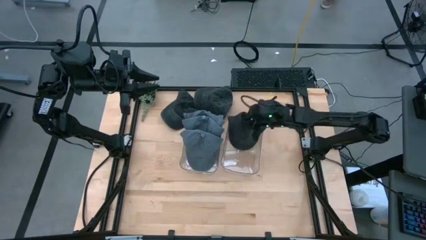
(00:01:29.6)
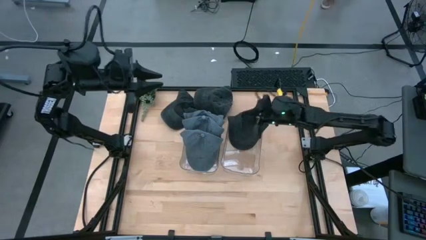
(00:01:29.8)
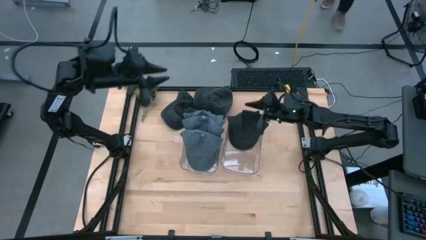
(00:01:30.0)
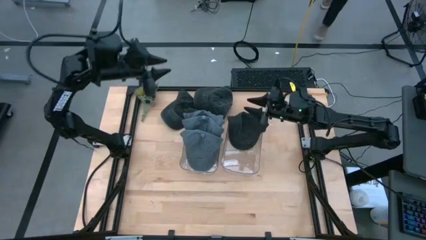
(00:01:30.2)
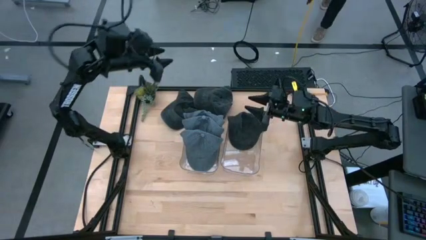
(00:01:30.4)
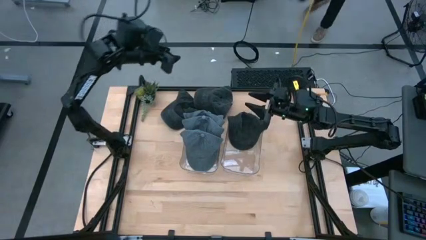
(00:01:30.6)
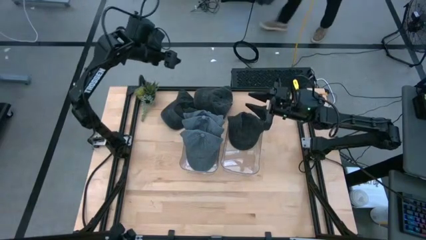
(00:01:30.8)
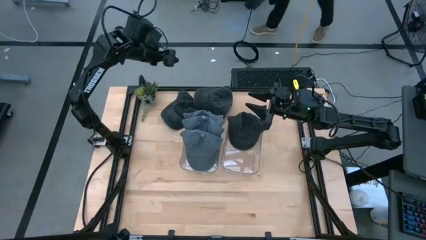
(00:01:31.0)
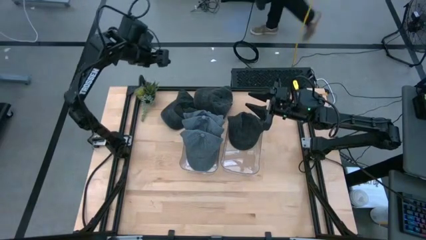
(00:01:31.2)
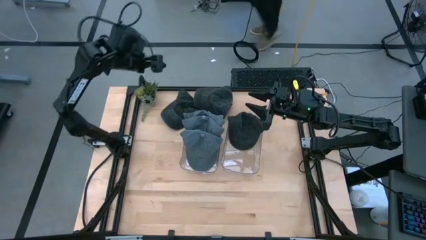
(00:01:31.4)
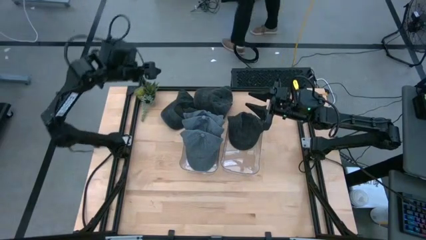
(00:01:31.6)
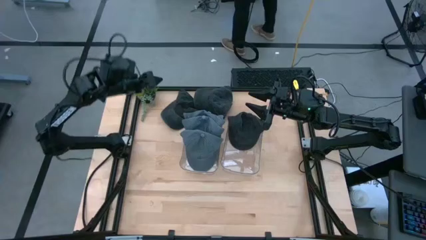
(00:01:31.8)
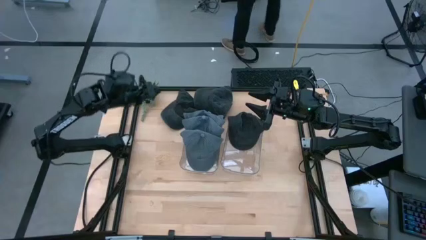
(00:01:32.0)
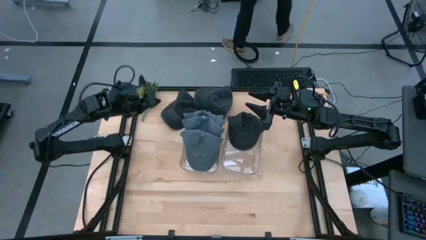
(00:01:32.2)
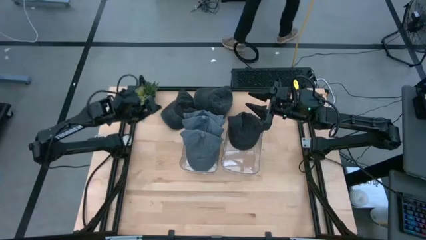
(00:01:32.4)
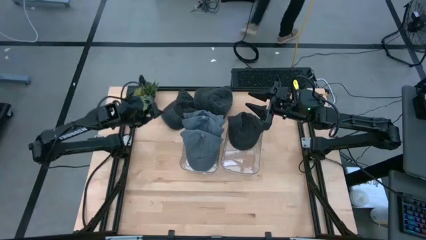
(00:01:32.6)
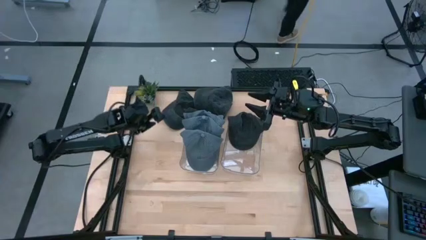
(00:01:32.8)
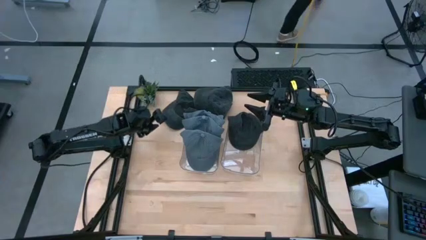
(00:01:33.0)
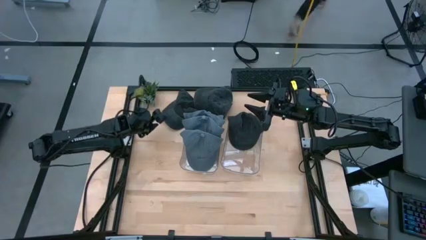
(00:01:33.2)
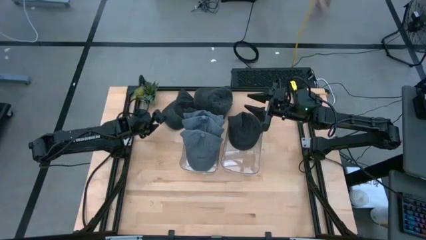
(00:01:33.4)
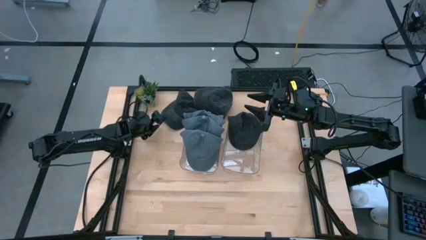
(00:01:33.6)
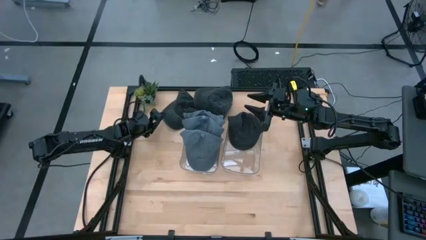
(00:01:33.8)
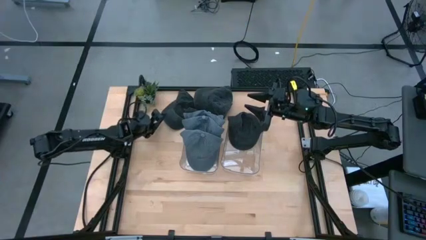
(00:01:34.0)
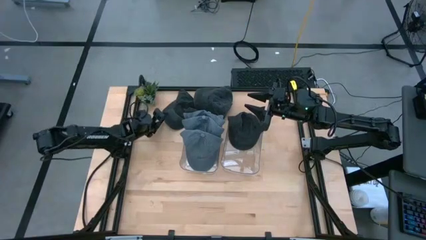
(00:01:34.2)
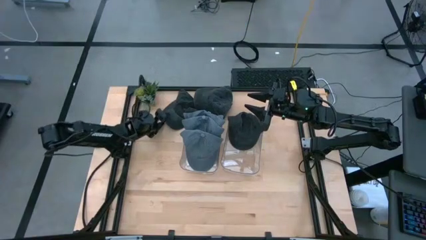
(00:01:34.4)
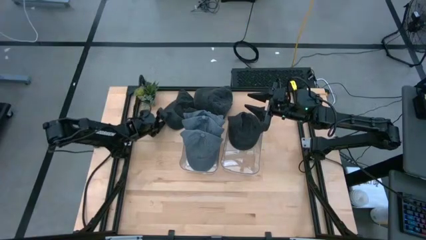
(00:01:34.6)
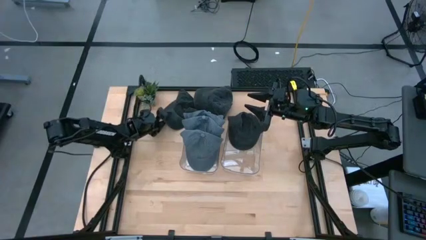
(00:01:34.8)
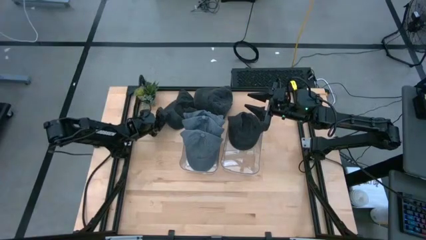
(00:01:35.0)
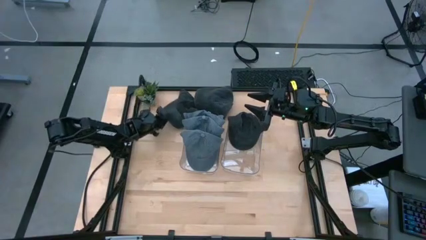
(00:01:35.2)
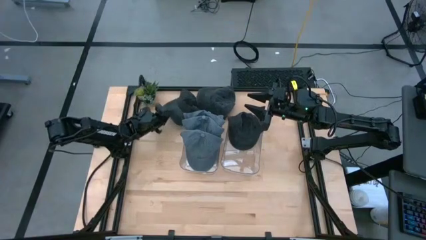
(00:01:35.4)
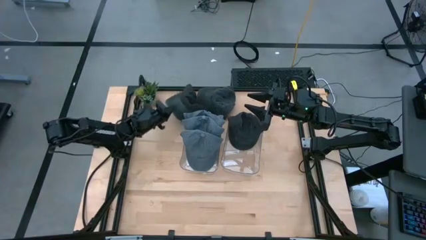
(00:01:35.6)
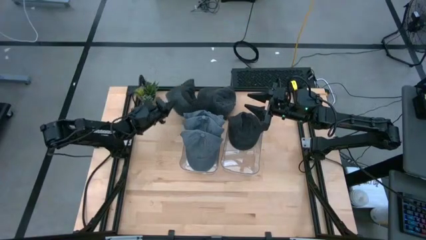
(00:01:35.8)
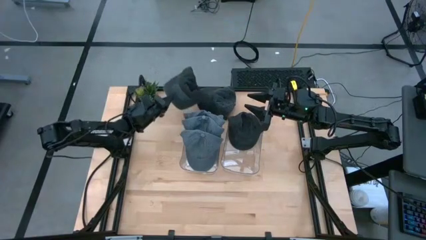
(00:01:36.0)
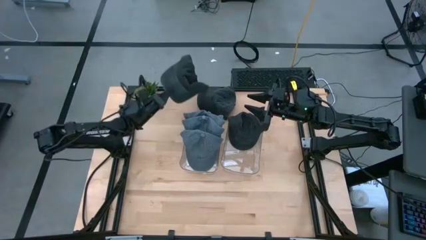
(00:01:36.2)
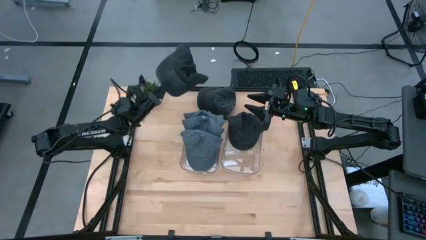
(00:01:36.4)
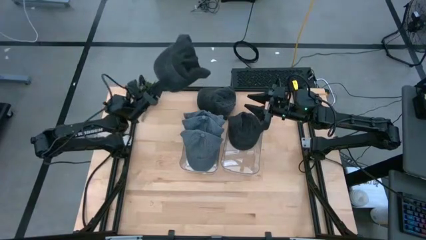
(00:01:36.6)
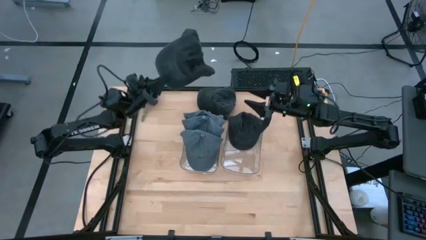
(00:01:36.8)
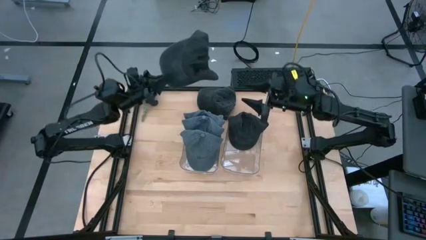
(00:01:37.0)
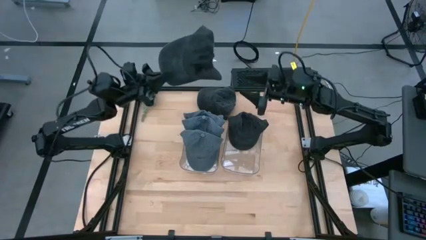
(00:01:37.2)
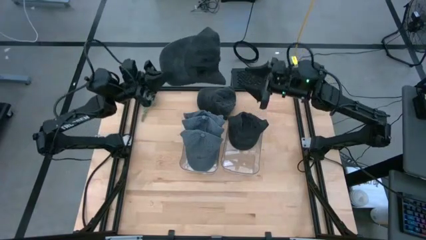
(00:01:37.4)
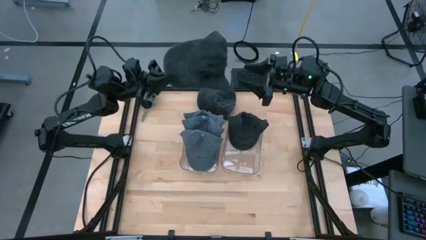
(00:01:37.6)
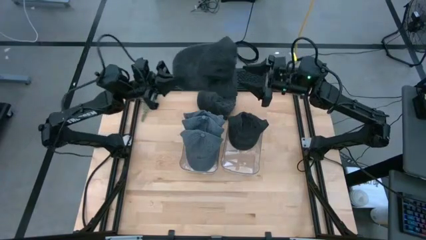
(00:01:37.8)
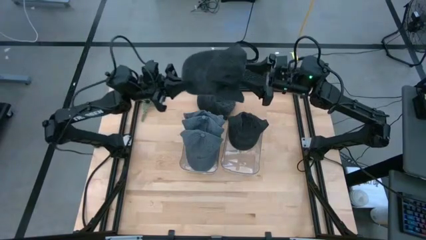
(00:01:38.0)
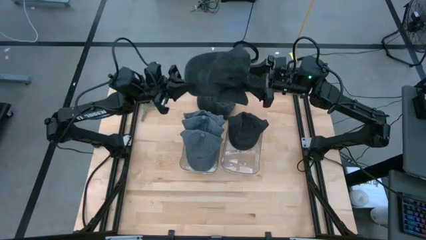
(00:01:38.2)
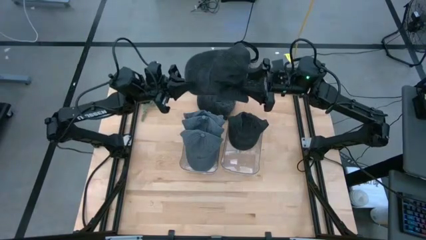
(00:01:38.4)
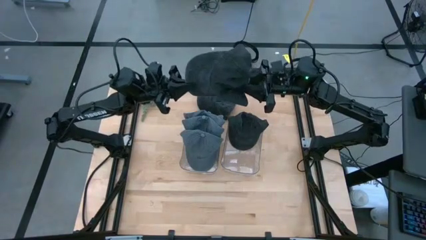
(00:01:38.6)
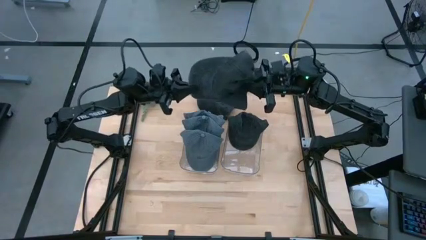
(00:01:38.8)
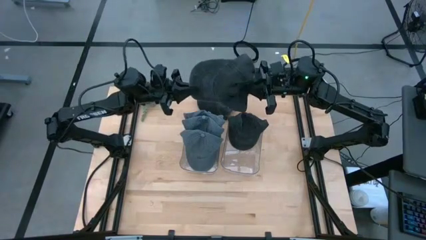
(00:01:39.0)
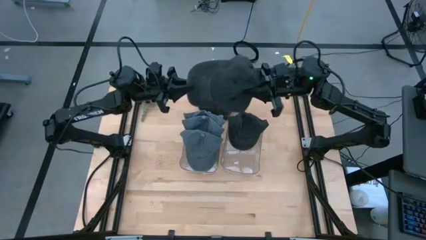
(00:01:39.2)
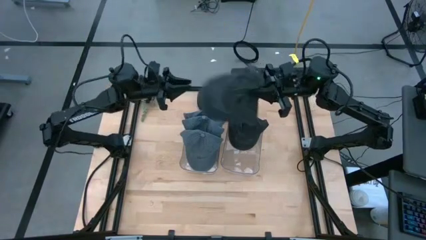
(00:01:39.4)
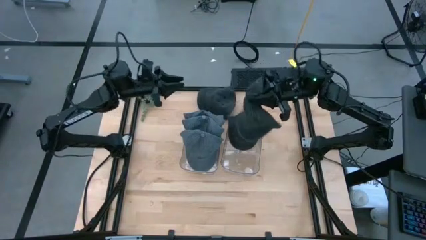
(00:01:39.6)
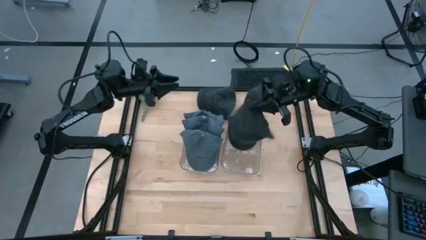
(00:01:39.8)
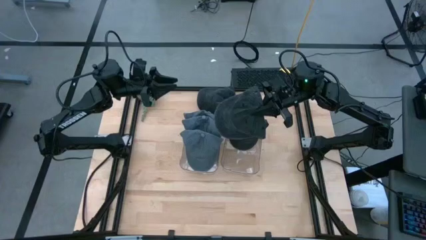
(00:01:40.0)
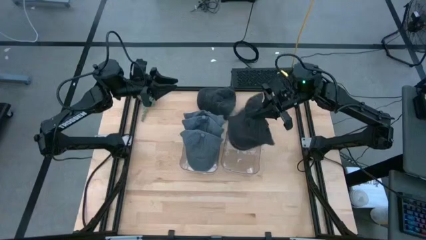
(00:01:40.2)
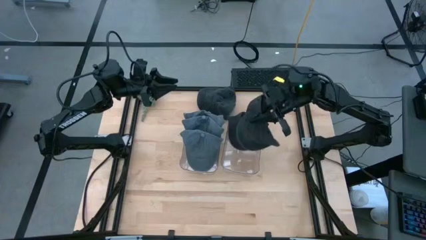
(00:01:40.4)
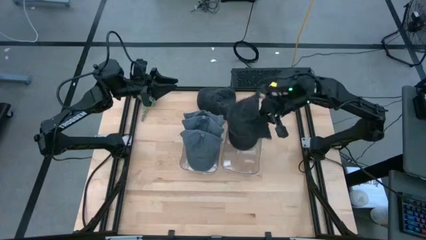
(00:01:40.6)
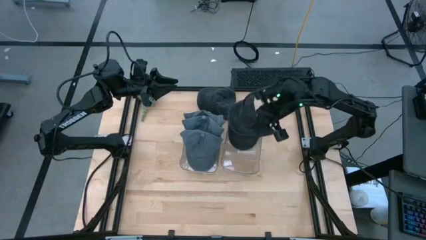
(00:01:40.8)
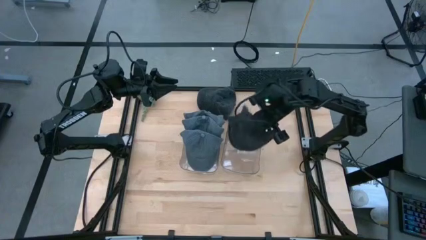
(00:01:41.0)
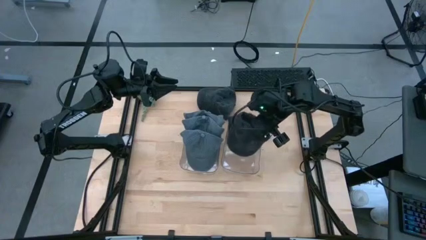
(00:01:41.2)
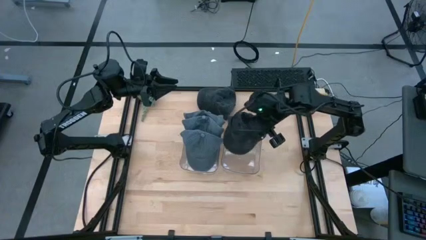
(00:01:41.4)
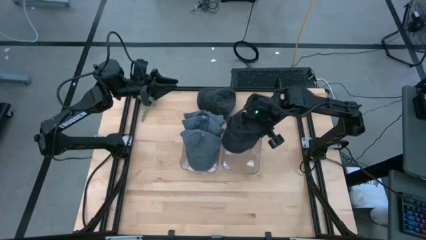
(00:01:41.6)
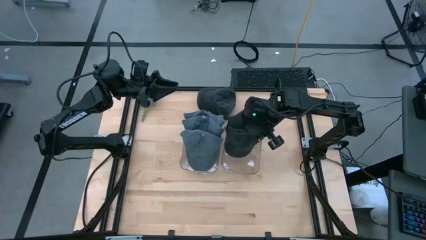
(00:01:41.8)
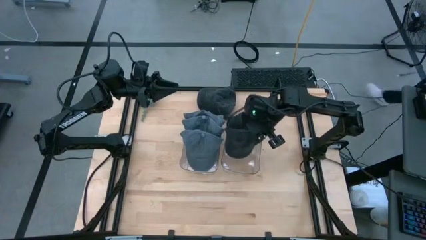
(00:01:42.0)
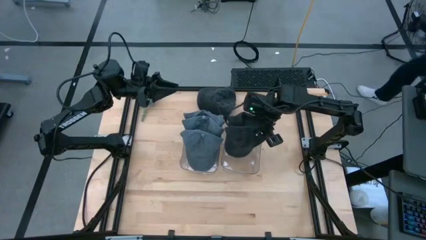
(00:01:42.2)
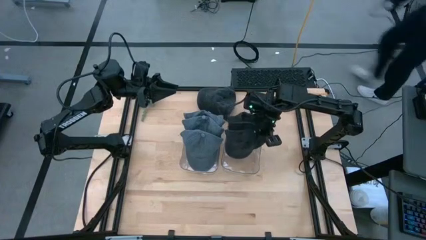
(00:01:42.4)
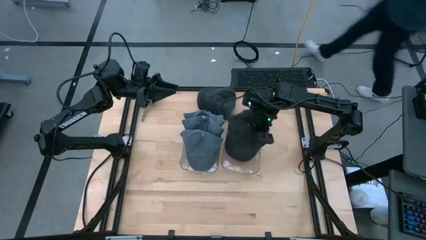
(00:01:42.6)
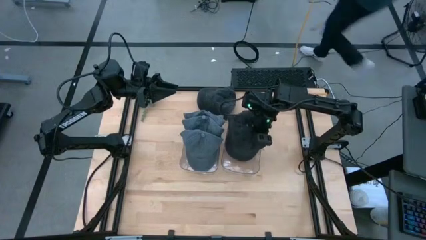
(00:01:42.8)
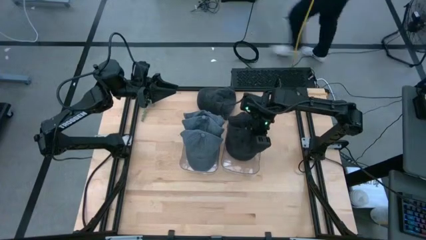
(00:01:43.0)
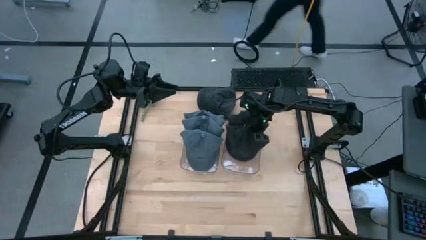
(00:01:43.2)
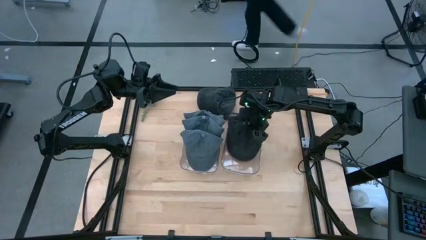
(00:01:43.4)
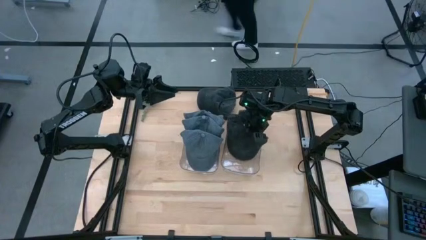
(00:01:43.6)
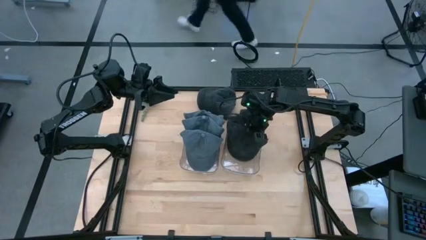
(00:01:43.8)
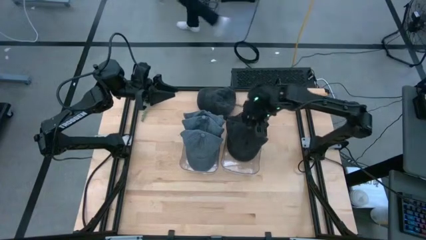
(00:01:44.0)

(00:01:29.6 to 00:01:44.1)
Task: Pick & Place hat
Put the left black cap into the right transparent bin

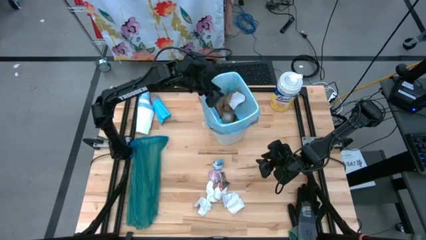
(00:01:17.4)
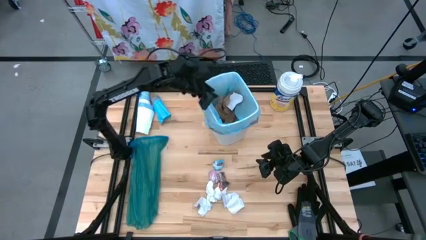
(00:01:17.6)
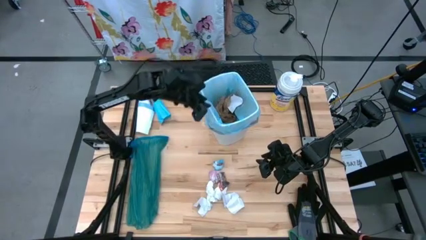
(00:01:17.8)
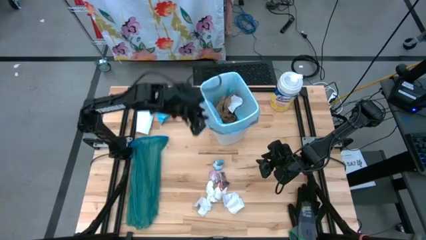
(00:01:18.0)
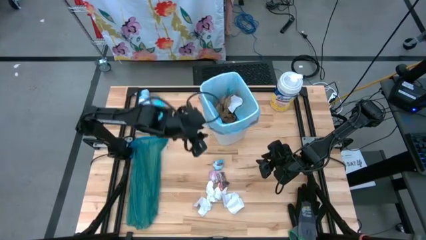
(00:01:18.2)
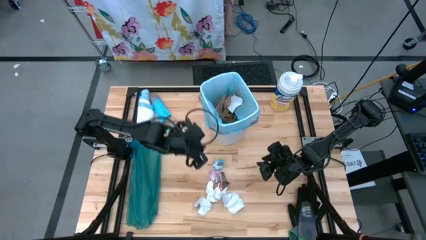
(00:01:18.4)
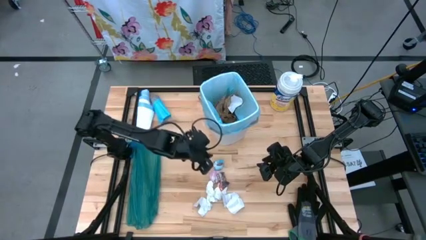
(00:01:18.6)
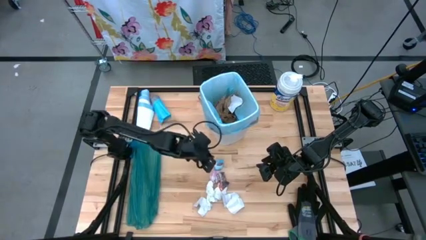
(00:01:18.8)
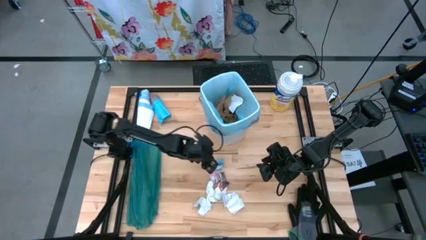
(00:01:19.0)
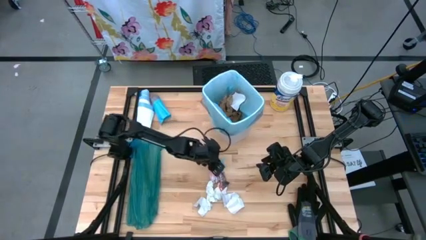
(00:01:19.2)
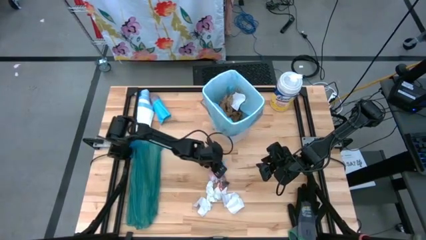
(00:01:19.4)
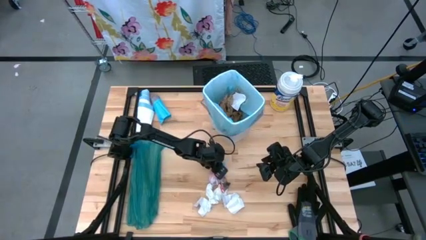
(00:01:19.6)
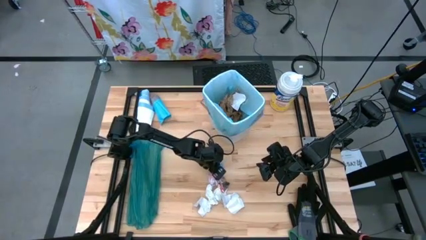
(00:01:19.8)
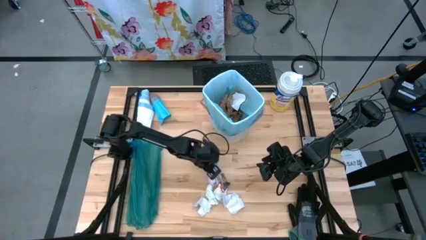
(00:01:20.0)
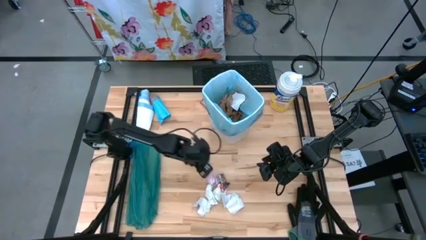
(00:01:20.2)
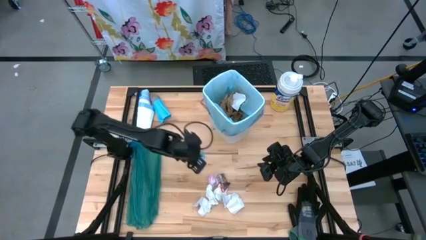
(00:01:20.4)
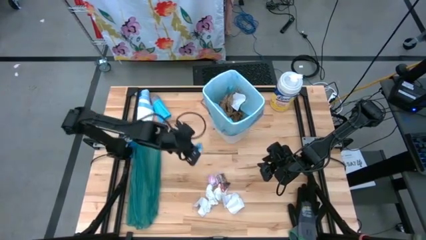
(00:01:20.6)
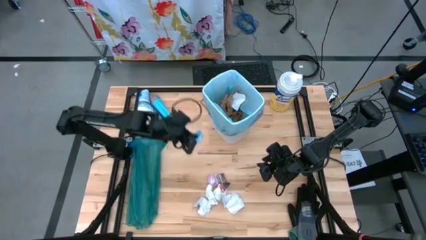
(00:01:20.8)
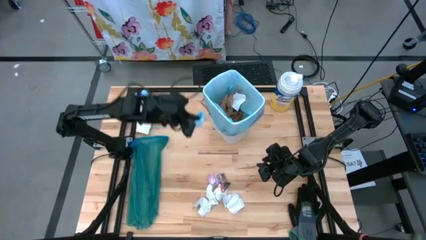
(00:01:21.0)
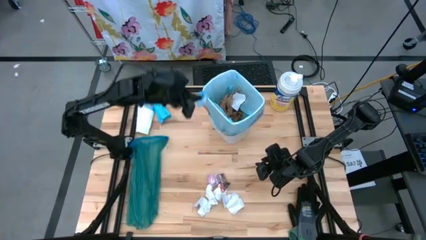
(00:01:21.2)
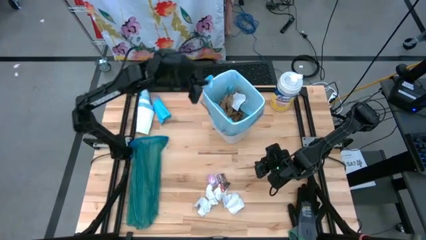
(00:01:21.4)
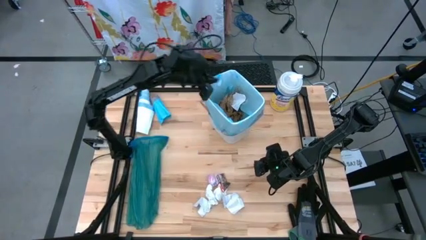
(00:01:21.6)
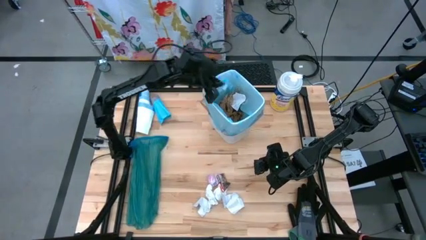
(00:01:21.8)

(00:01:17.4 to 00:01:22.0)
Task: place trash/remove bag and relplace
Put the blue plastic into the trash bin
